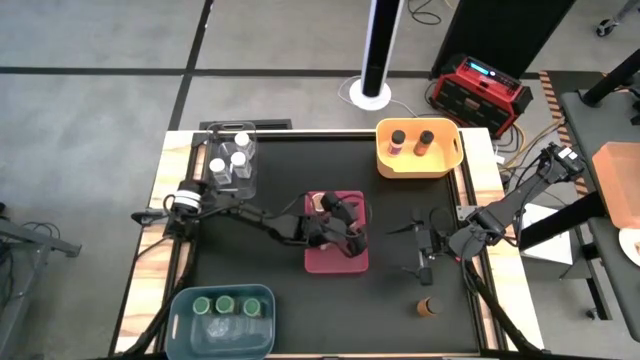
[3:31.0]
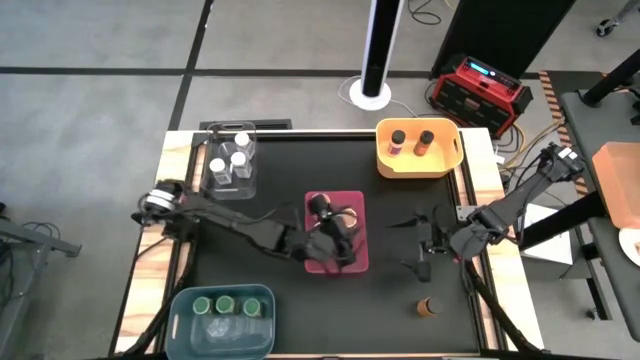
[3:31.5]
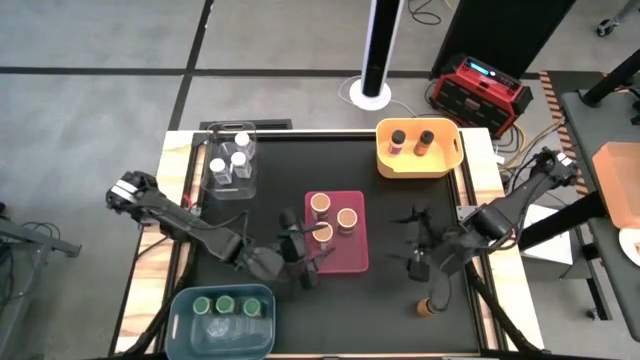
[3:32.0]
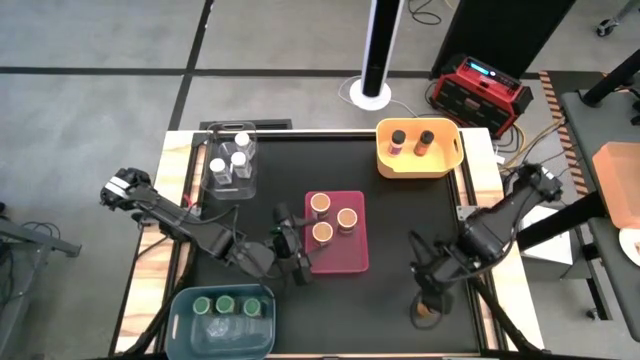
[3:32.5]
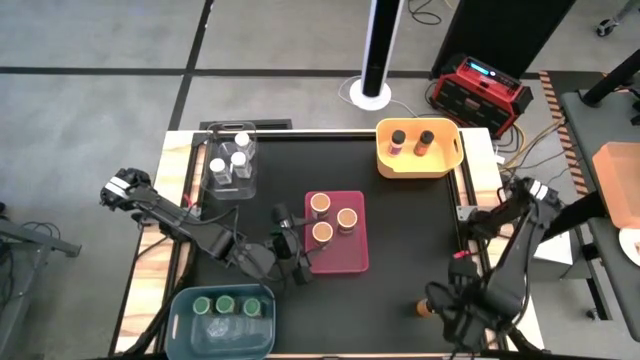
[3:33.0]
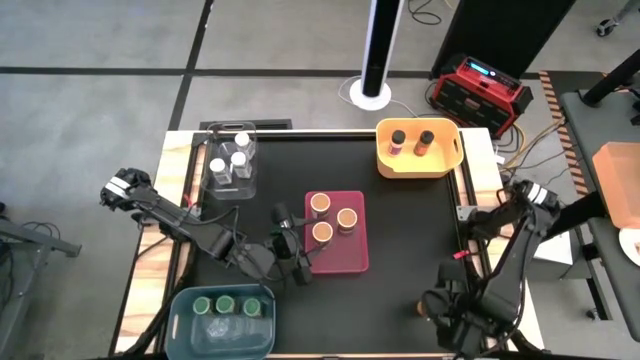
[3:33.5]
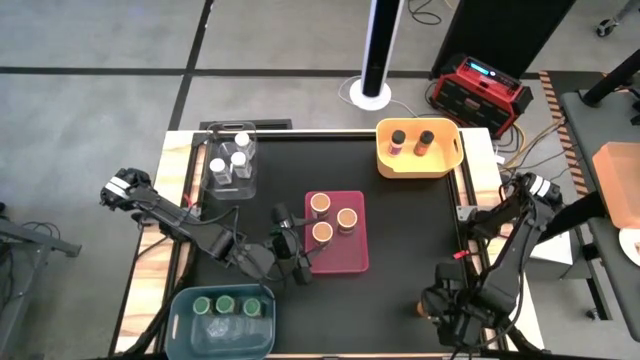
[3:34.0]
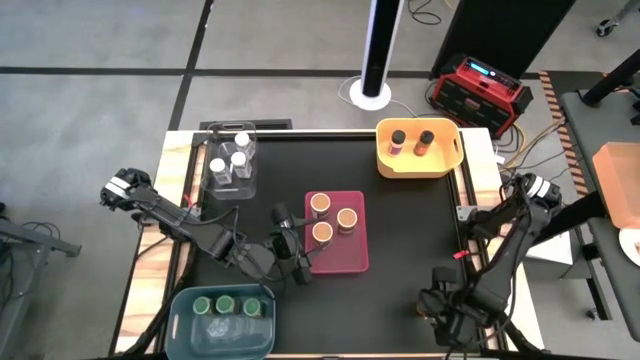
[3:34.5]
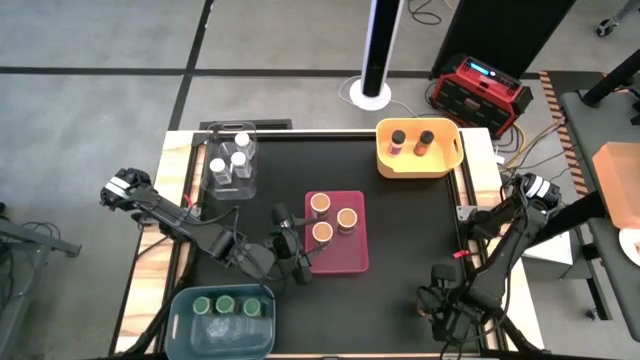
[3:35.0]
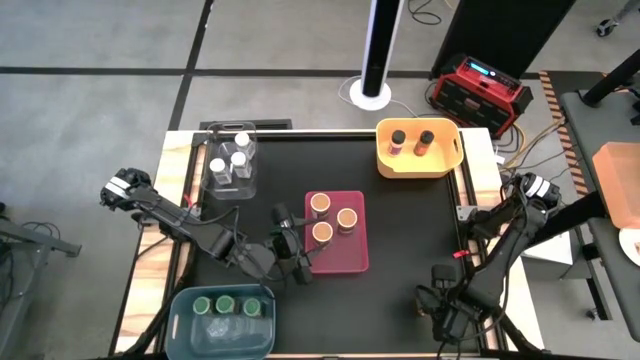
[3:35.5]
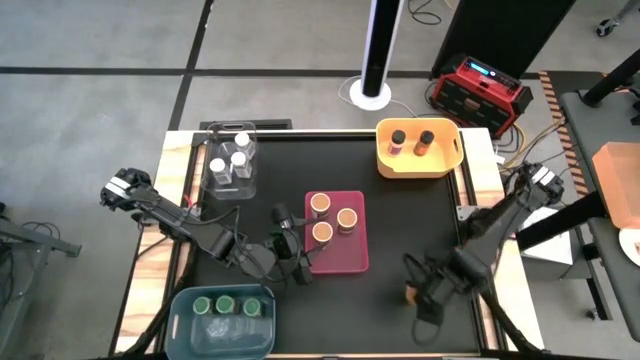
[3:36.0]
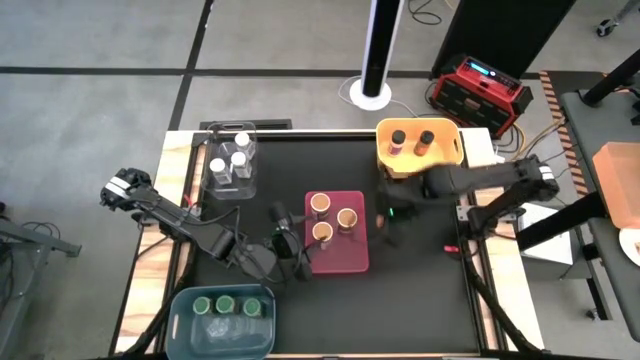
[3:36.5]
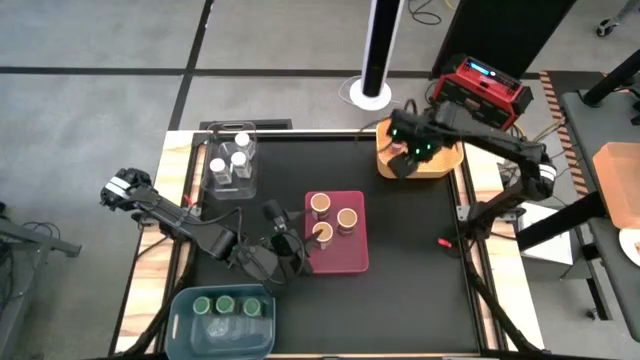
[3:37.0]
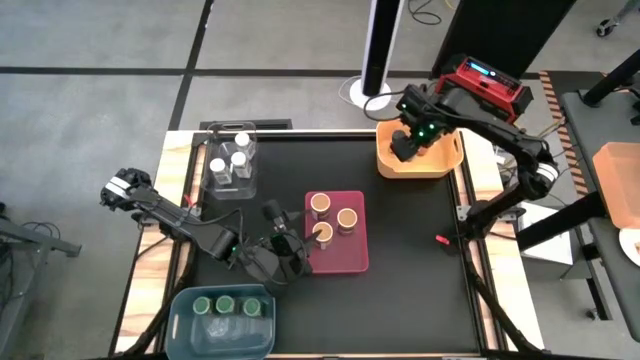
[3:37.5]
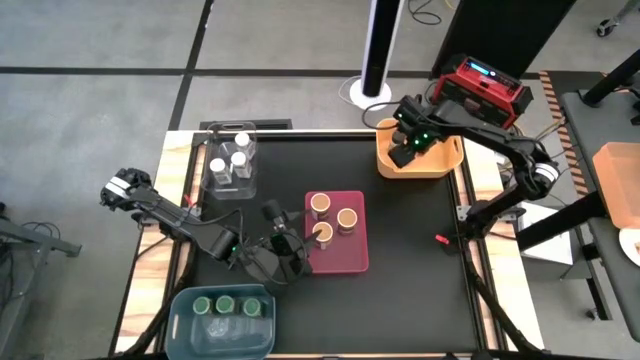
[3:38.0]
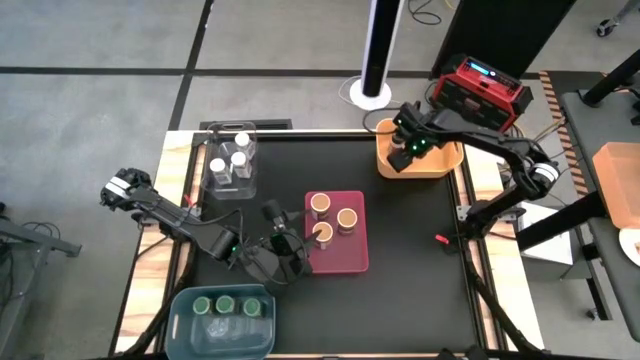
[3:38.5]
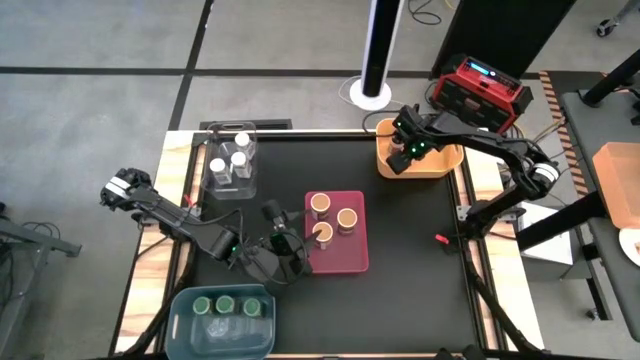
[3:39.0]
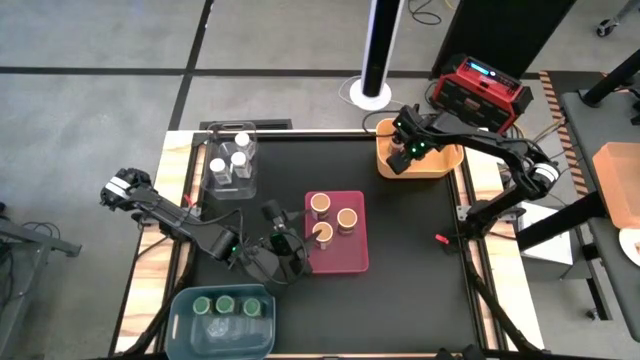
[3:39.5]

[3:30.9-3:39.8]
Task: Sort spices by type
Put the orange seasoning bottle into the yellow bin

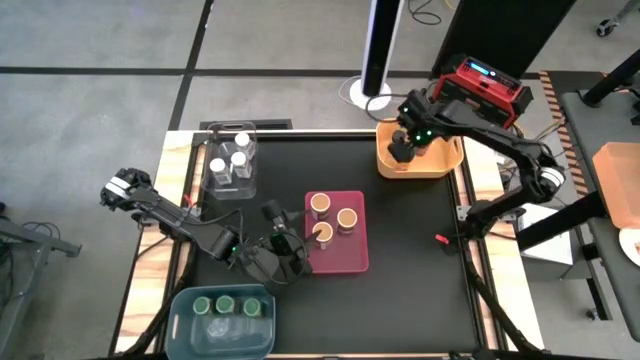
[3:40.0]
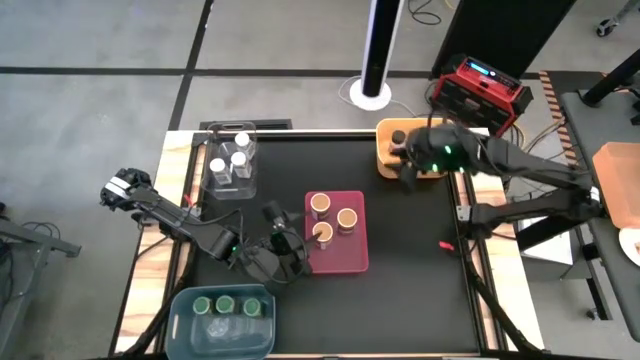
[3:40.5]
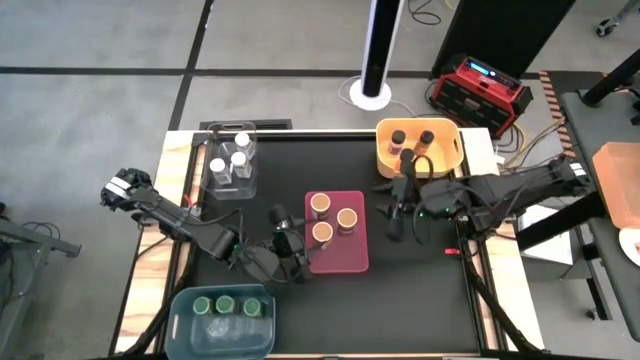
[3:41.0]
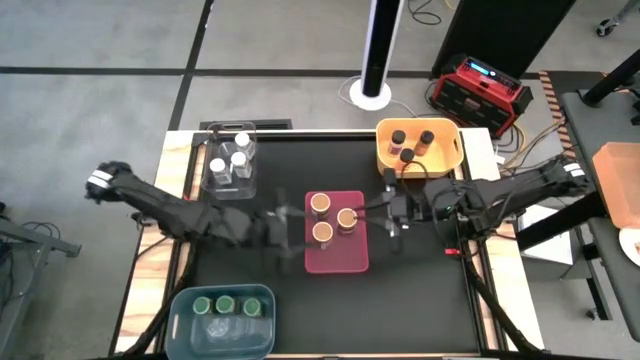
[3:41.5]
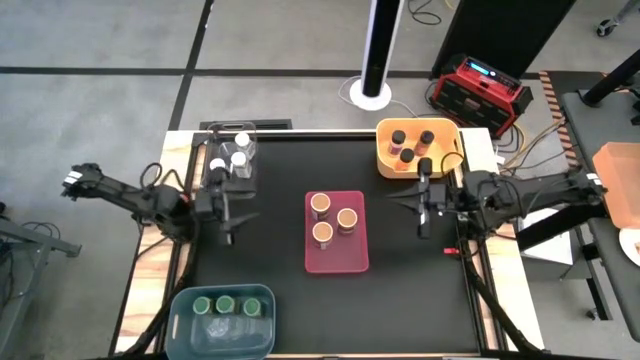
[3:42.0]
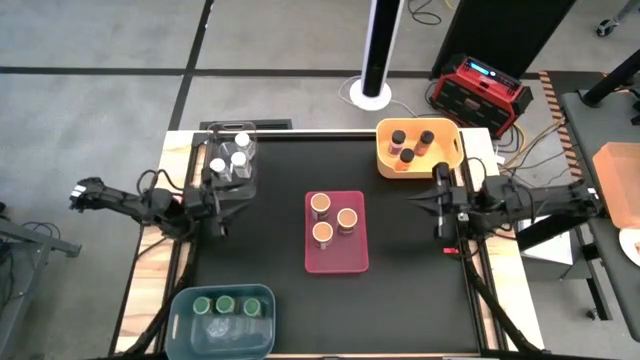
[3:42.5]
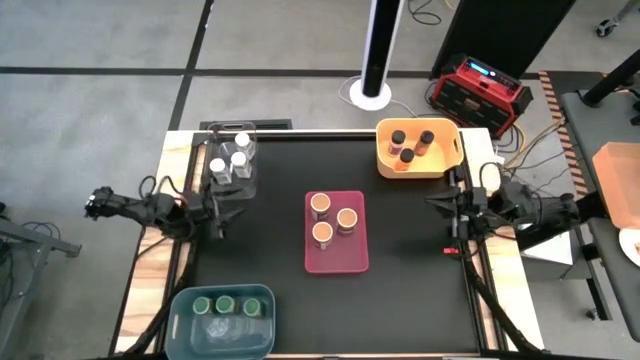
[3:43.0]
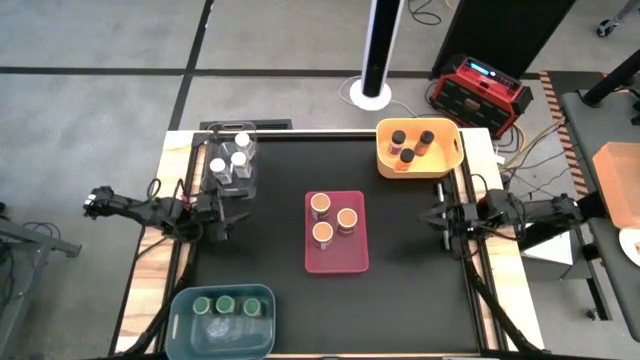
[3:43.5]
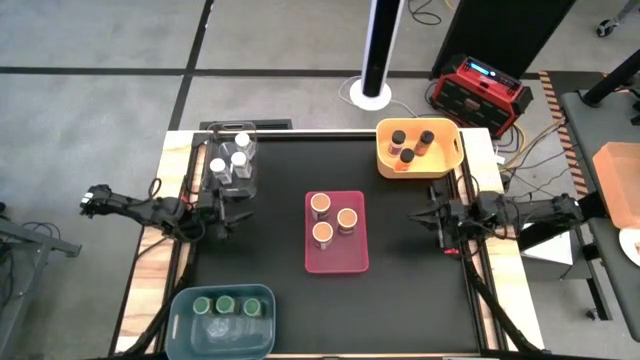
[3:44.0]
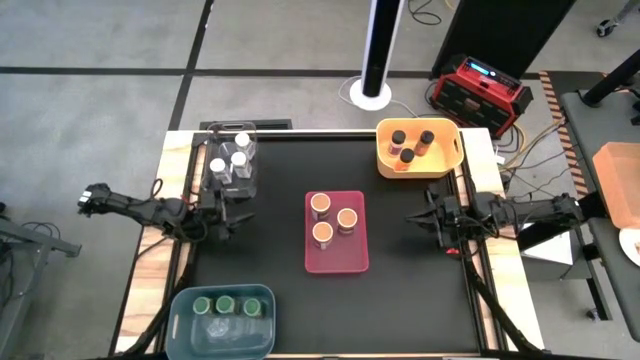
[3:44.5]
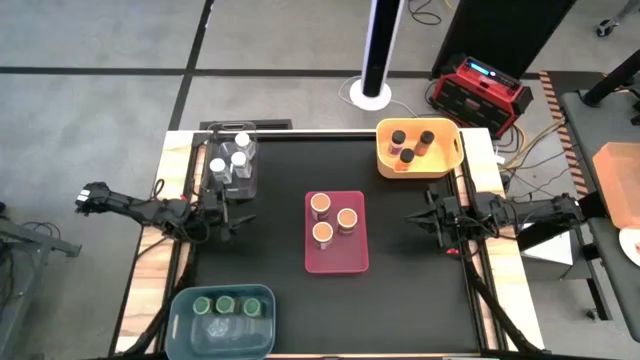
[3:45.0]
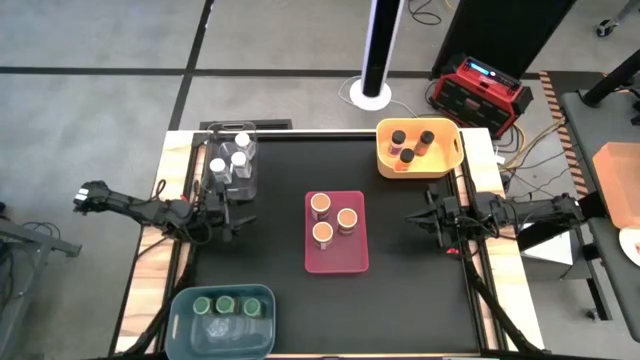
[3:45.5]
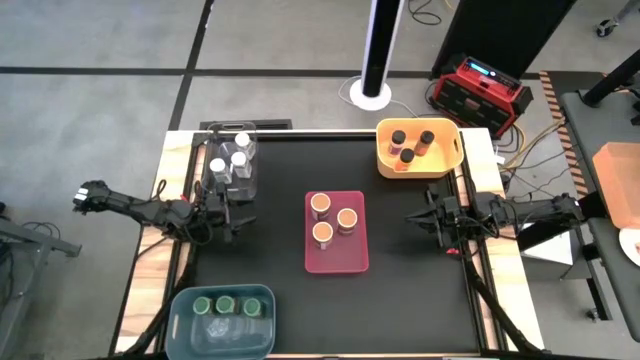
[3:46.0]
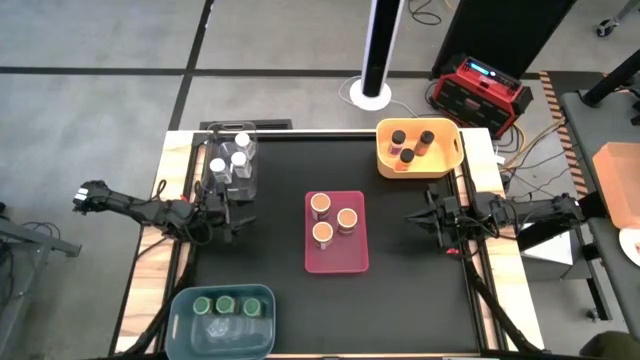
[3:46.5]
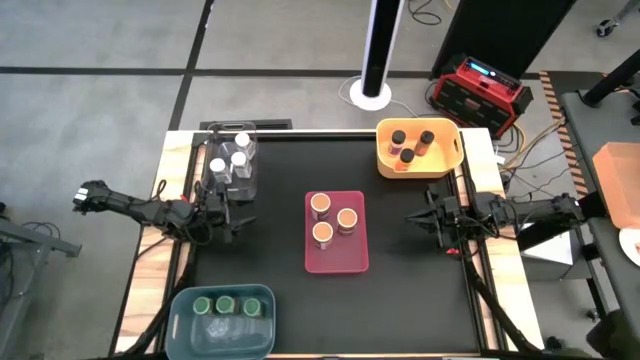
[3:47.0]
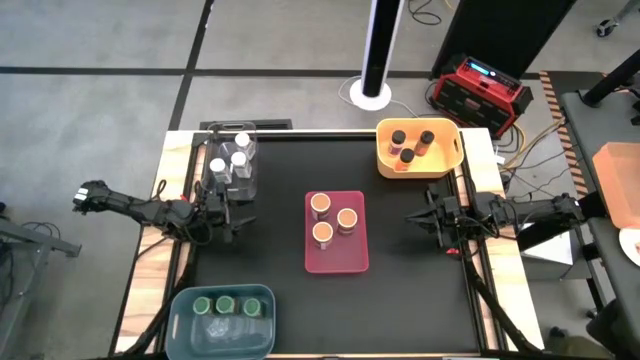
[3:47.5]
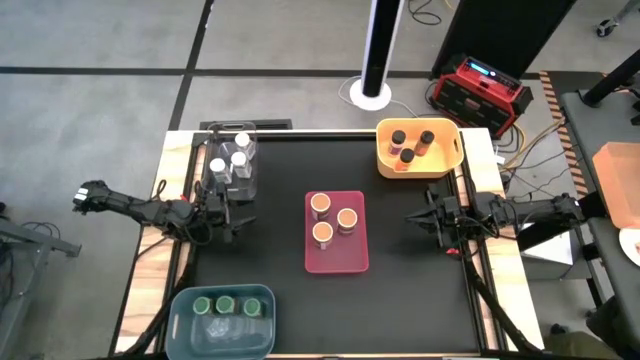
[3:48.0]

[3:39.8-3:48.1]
Return to Home Position
